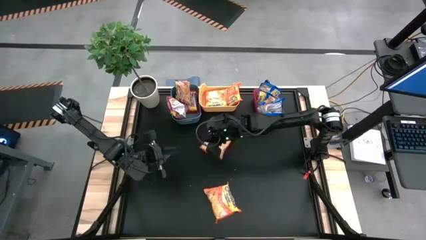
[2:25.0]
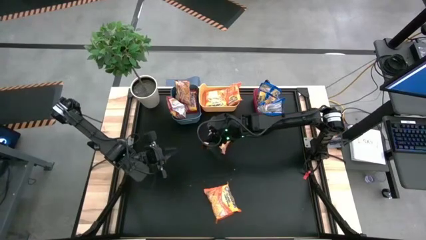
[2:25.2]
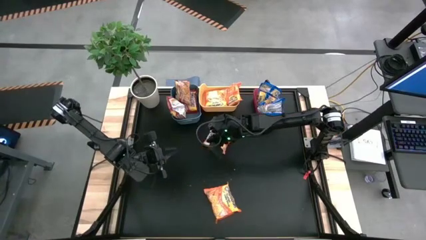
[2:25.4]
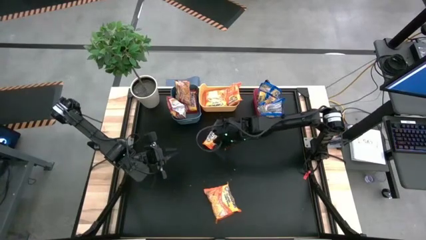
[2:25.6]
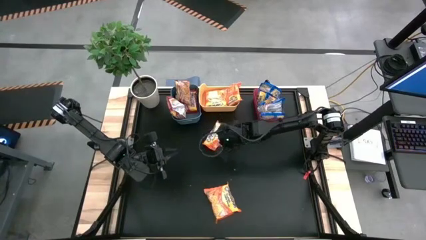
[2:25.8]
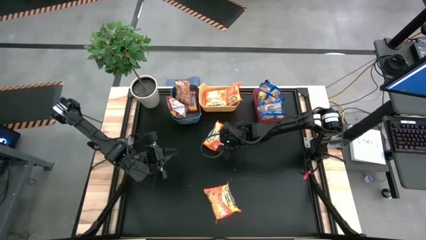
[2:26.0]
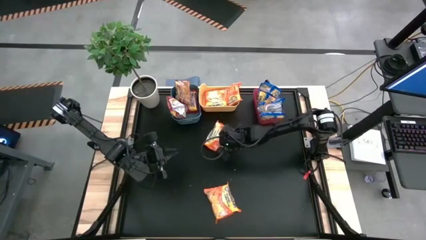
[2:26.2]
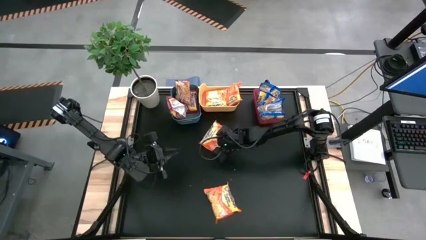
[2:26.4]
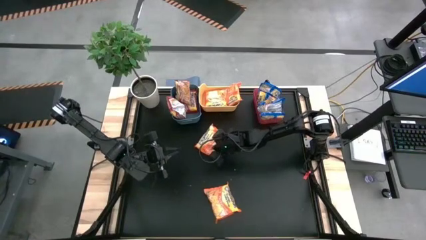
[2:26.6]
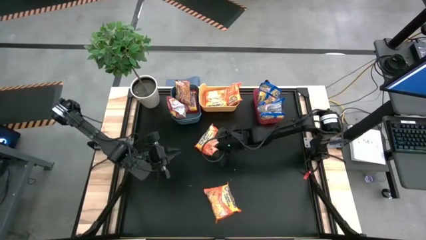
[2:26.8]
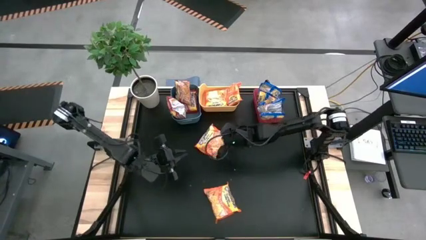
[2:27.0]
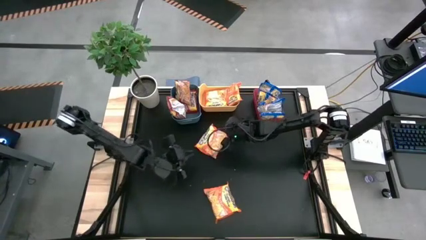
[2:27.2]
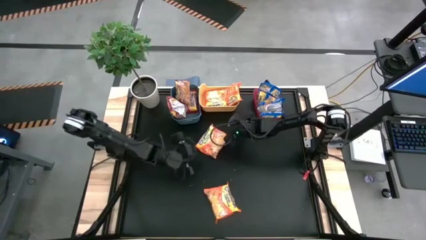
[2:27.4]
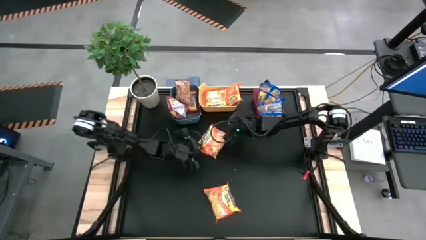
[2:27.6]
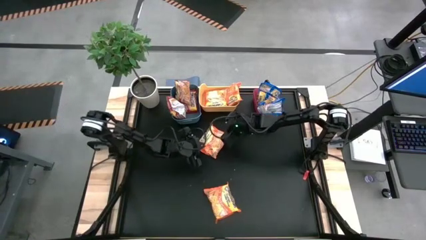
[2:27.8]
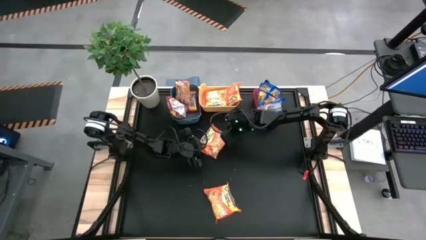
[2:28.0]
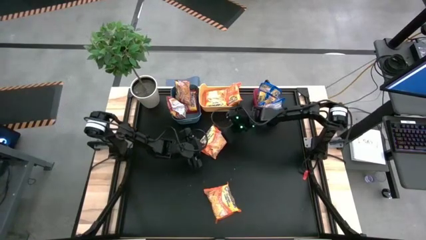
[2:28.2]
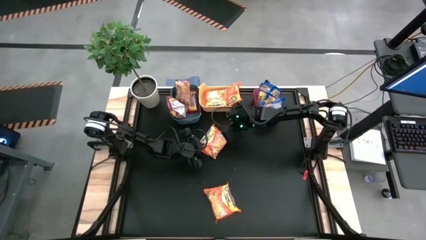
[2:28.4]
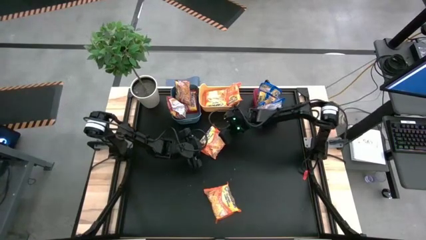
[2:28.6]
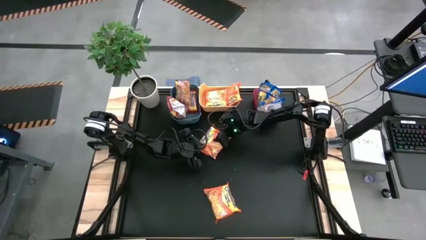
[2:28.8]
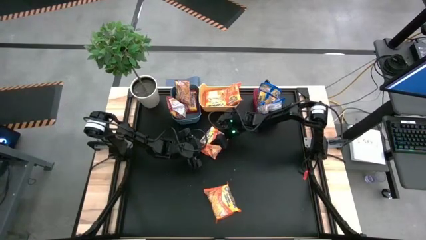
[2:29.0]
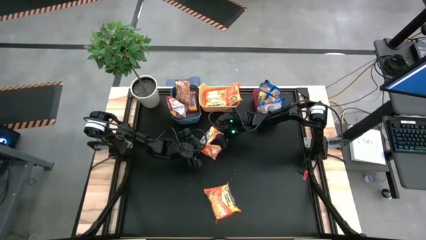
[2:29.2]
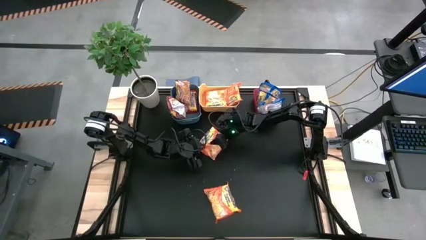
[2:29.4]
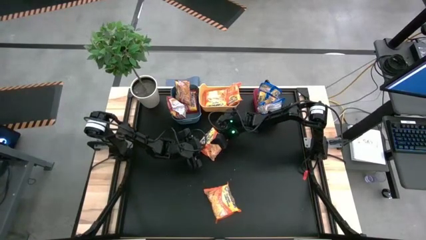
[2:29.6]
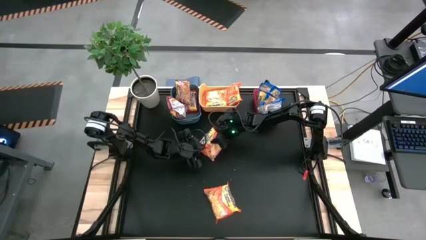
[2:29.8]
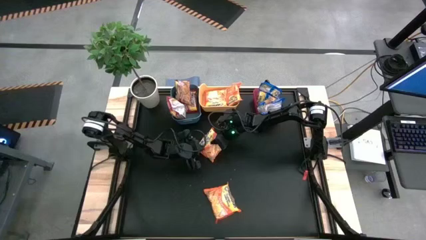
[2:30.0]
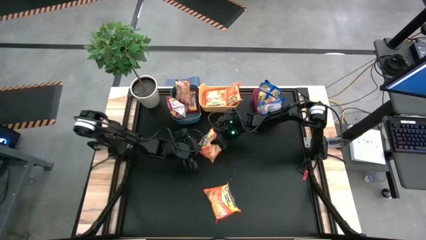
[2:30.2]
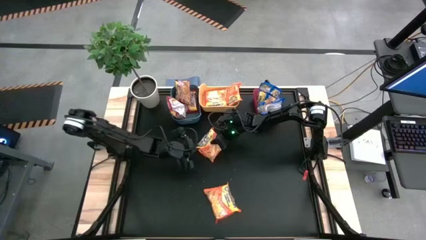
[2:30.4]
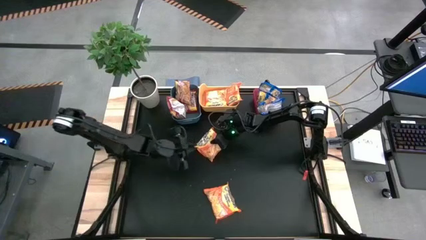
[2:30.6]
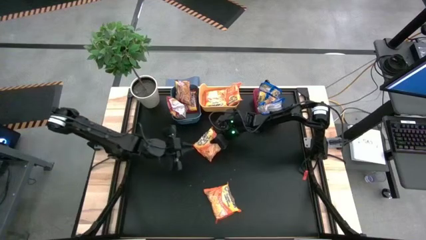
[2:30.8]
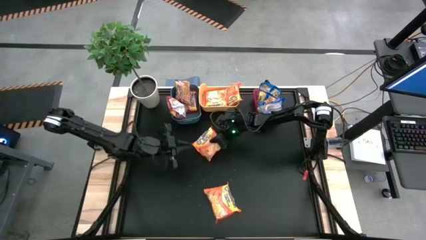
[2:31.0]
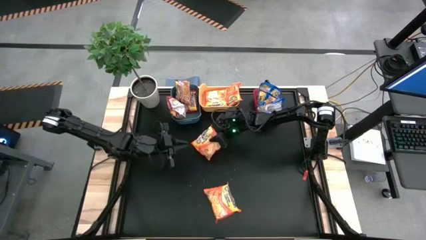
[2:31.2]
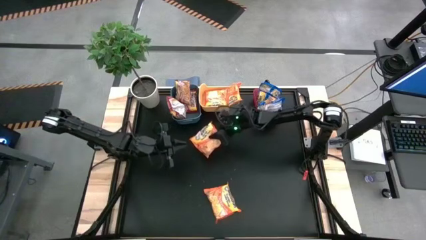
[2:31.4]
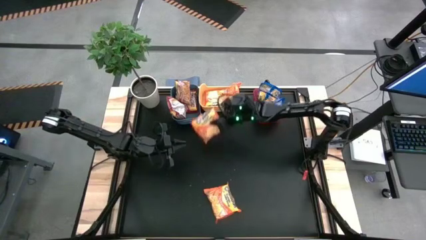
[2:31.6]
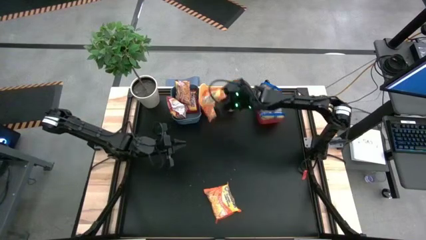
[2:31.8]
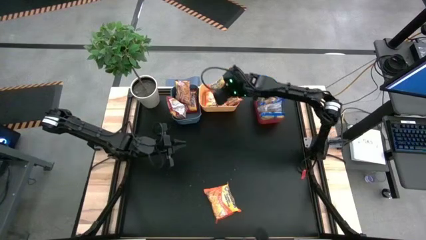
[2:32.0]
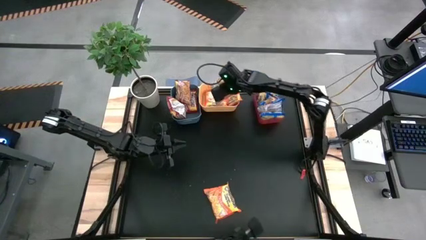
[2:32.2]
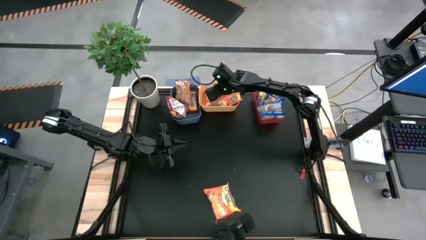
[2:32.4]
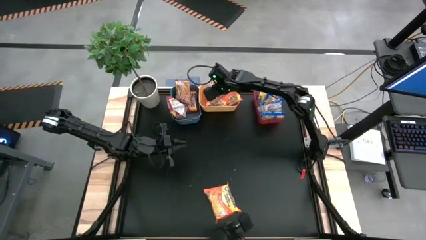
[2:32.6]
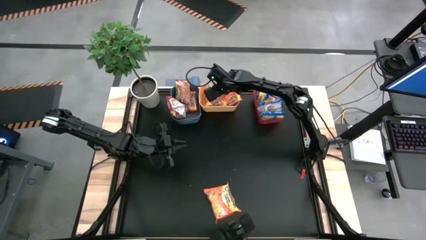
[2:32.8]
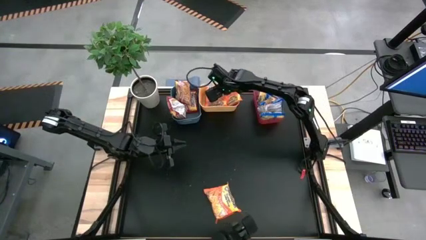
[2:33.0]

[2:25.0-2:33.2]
Task: Sort Maruchan noodles
Put the orange noodle pack into the yellow bin

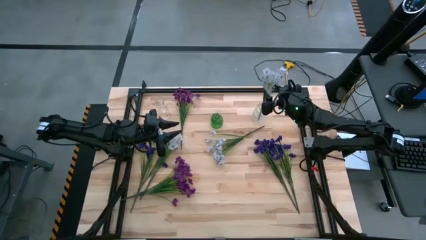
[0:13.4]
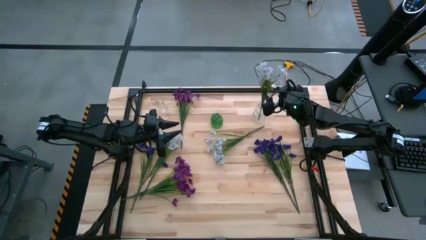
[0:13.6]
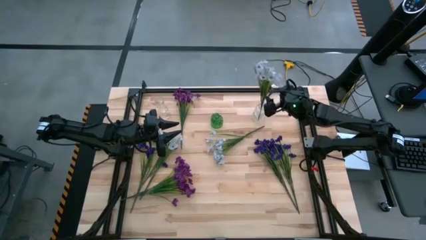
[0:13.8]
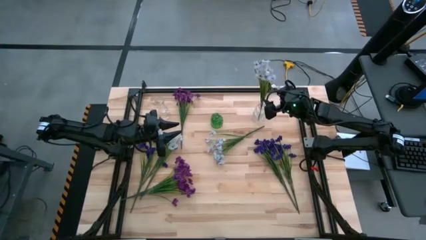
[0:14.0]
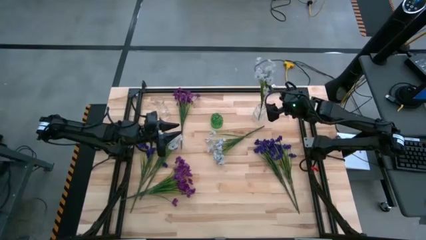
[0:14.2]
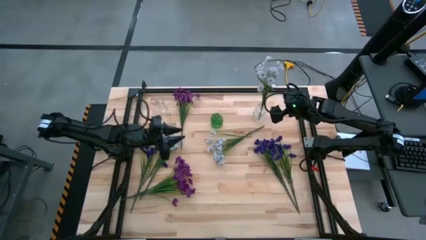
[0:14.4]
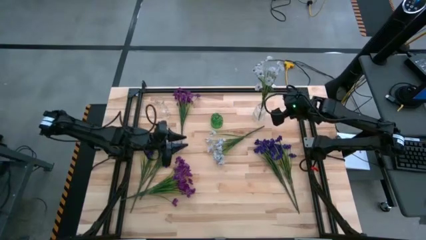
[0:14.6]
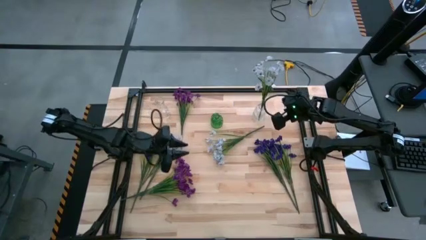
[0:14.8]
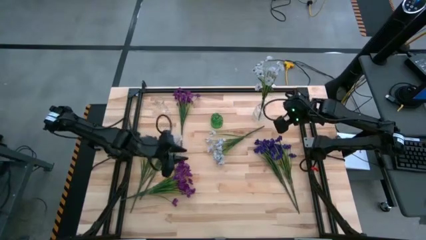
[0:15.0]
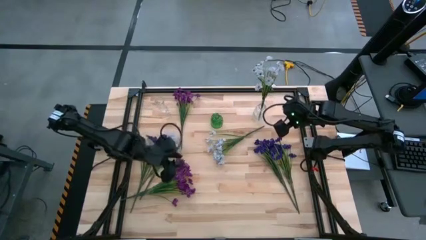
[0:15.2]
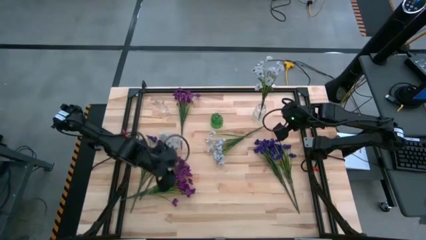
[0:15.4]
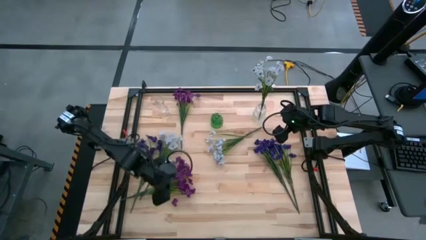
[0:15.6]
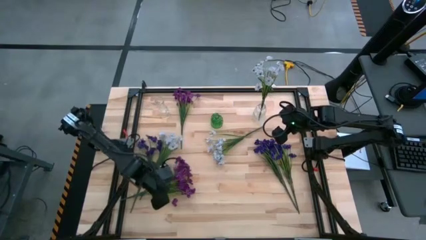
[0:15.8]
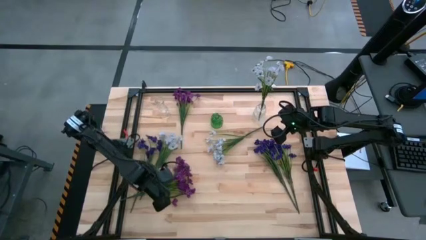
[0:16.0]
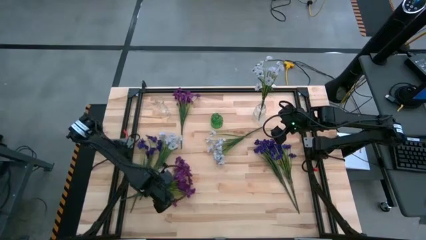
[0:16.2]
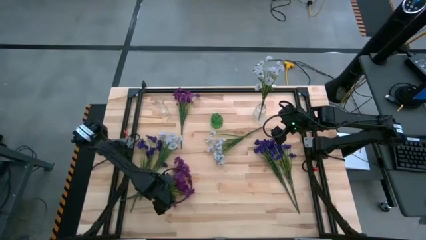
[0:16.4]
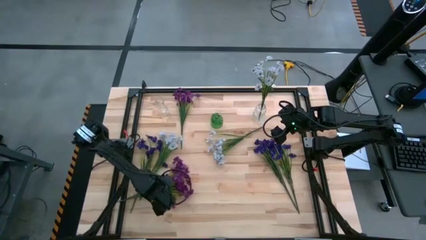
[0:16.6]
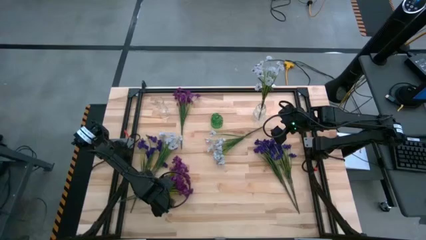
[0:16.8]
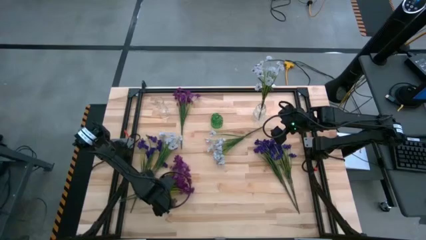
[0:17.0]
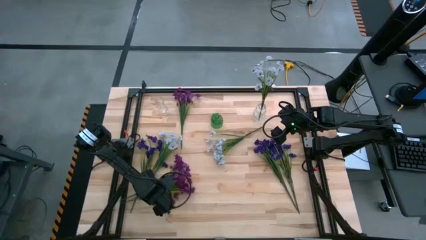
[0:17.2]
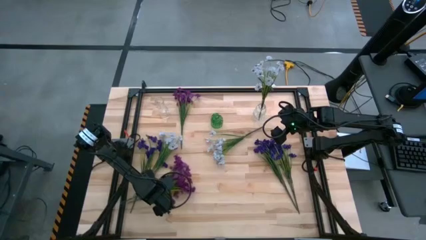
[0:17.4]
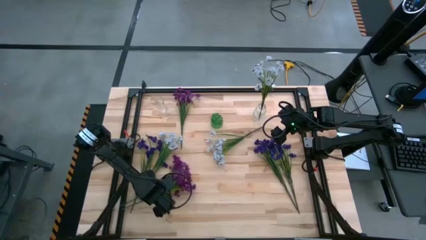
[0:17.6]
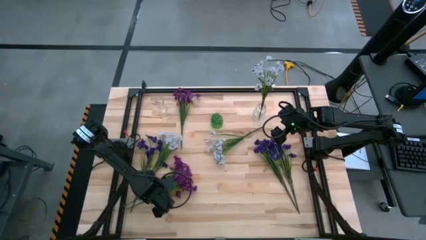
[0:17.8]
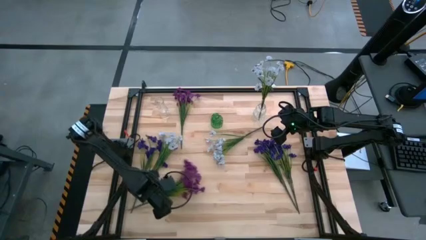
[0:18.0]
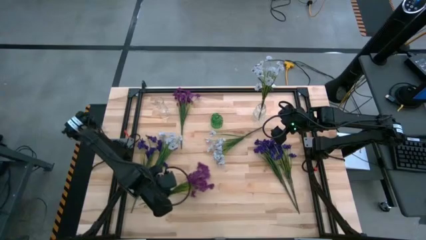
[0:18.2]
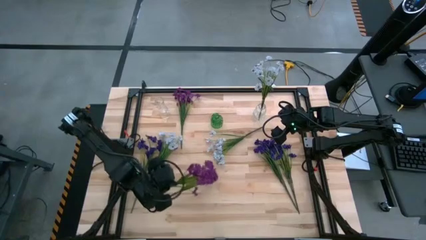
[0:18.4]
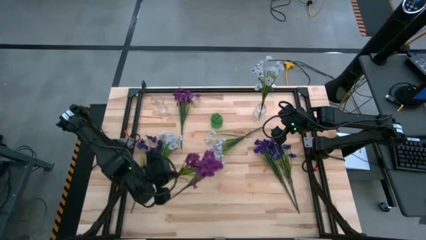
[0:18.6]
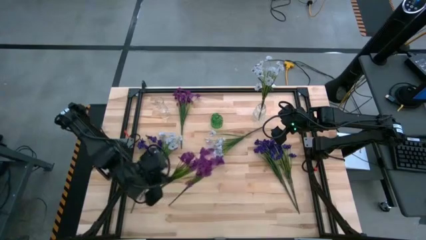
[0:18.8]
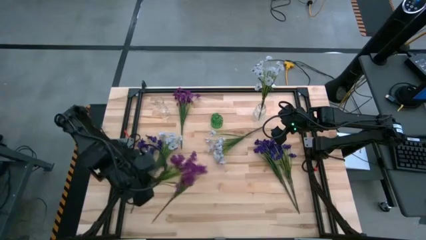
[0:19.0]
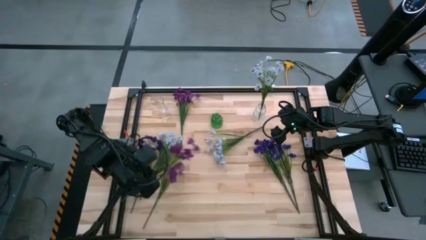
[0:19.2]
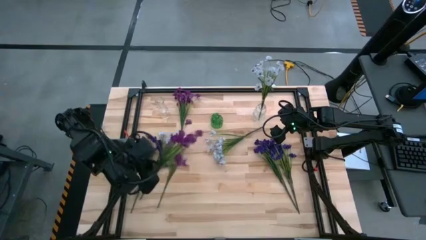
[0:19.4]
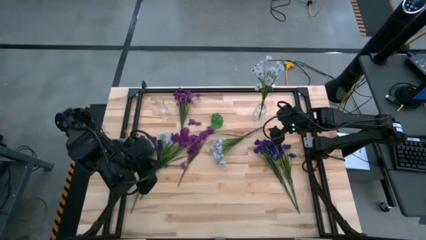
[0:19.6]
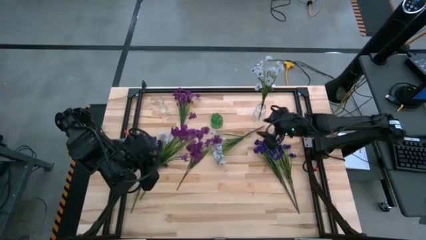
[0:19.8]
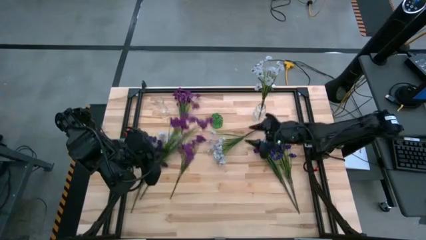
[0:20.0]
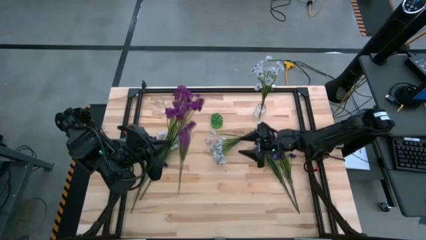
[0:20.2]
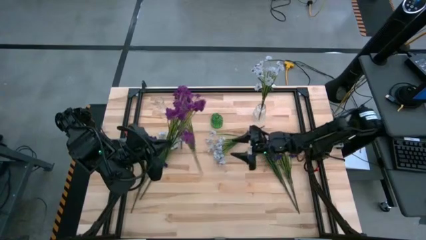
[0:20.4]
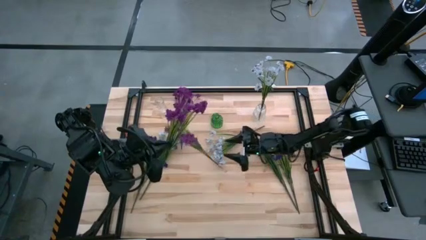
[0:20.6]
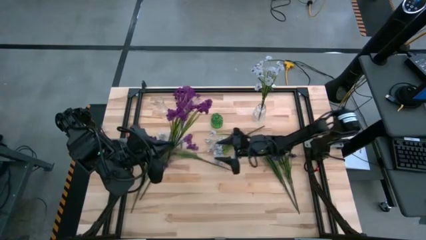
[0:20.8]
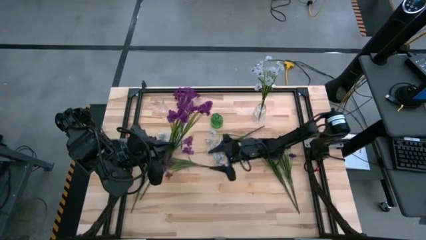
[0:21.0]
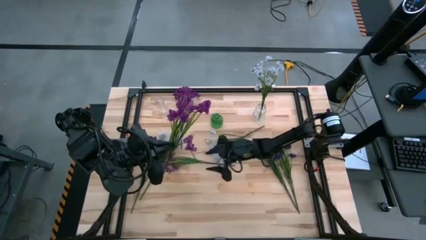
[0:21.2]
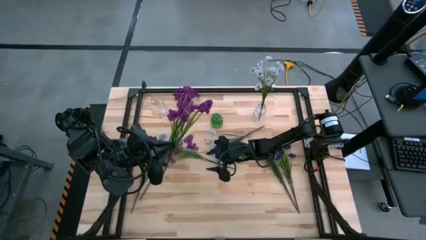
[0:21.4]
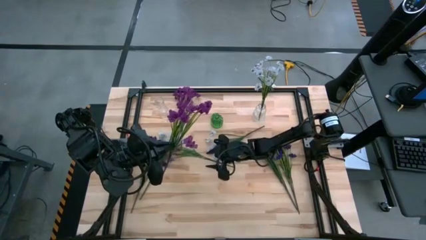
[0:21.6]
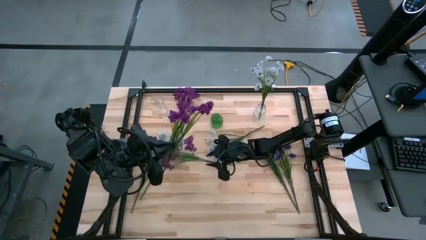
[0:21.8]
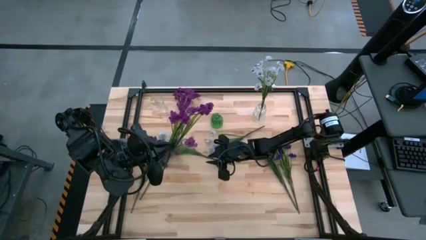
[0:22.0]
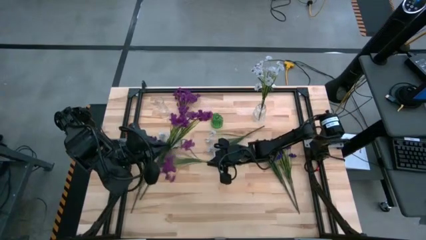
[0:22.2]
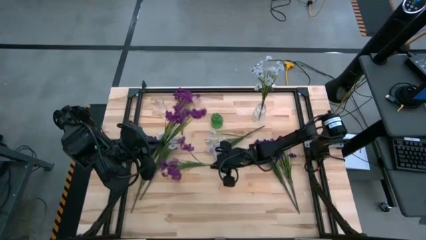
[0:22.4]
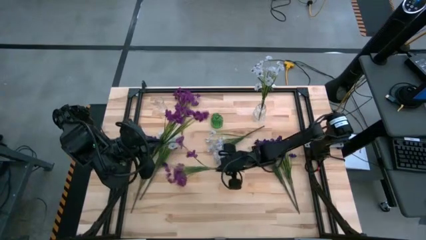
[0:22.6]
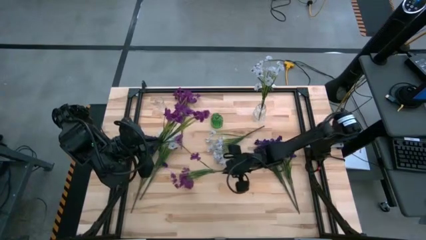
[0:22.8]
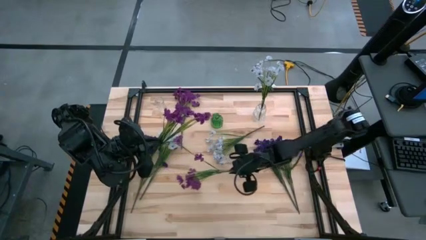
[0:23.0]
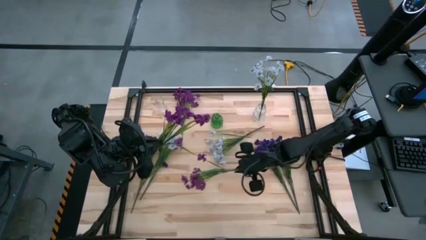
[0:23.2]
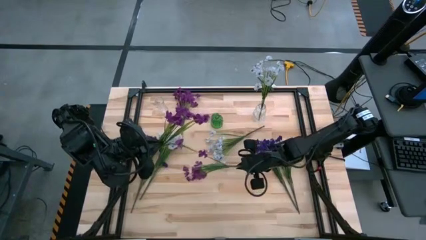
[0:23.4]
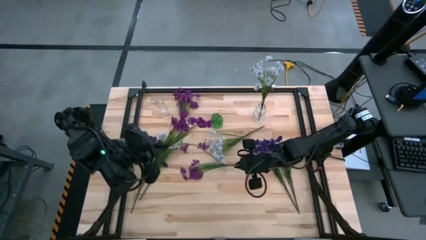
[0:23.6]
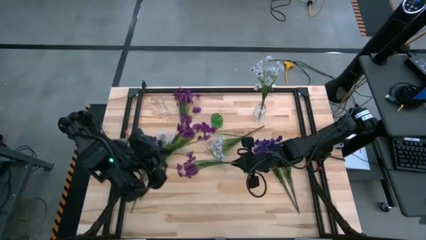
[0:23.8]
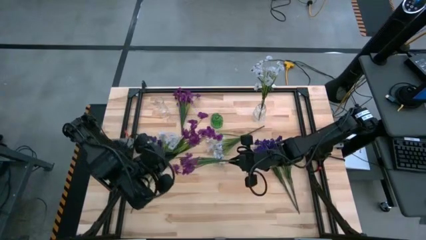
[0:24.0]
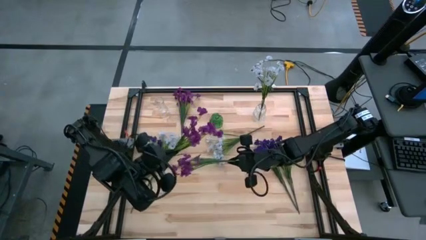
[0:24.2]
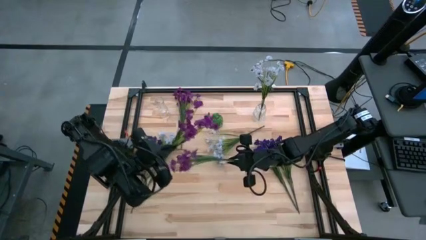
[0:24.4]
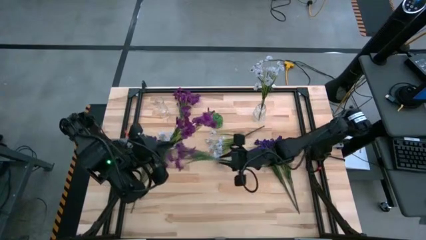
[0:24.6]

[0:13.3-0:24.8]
Task: Sort flowers into vase by color
Prepare the violet flowers into the left transparent flower vase
